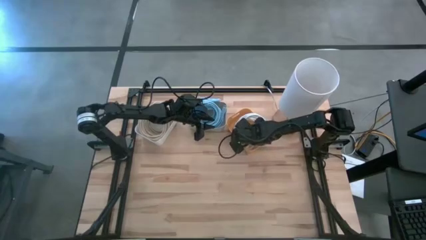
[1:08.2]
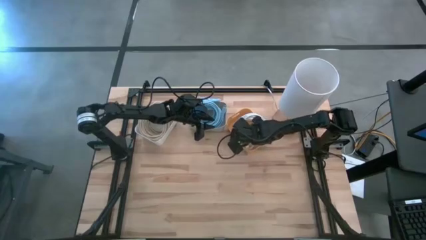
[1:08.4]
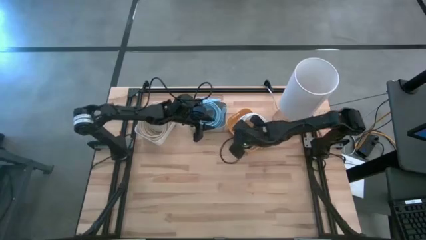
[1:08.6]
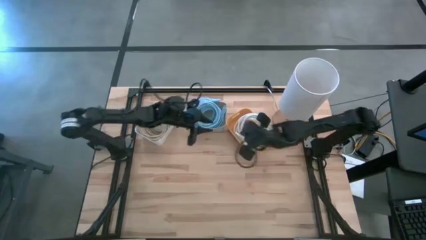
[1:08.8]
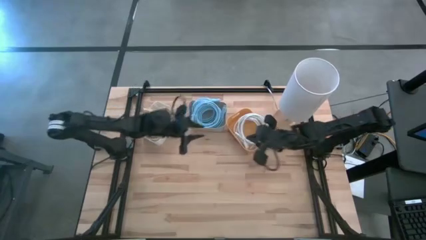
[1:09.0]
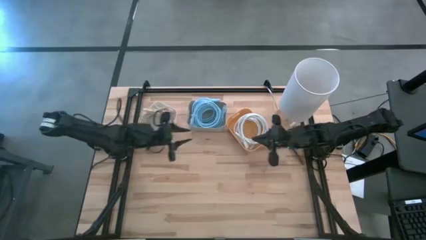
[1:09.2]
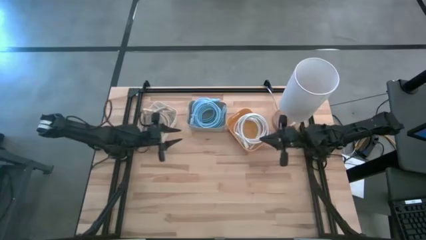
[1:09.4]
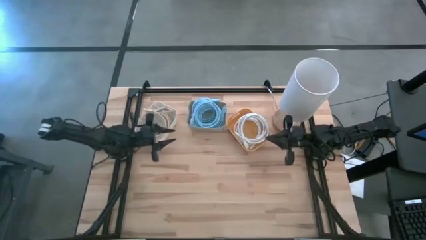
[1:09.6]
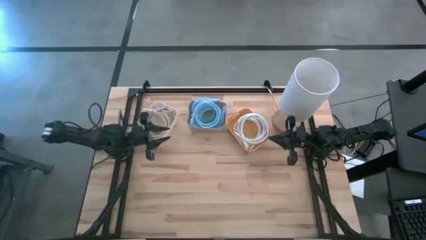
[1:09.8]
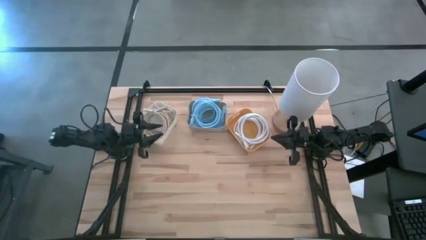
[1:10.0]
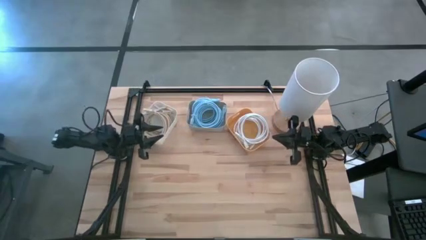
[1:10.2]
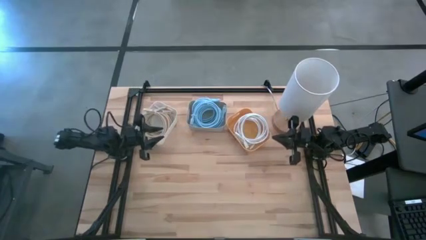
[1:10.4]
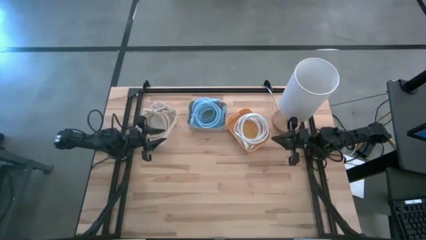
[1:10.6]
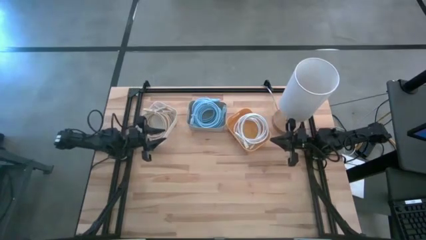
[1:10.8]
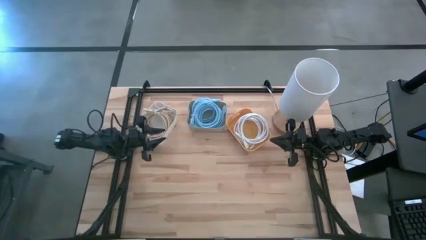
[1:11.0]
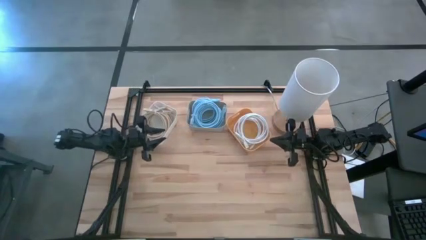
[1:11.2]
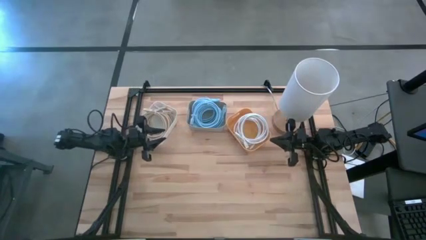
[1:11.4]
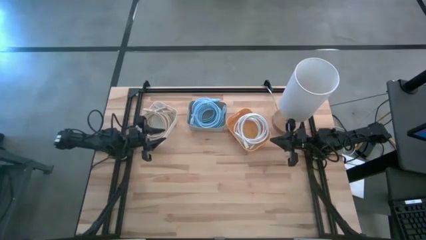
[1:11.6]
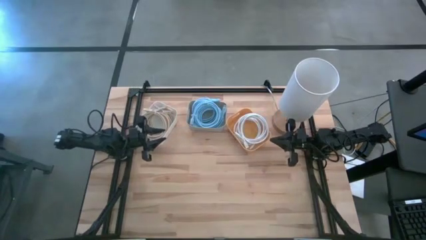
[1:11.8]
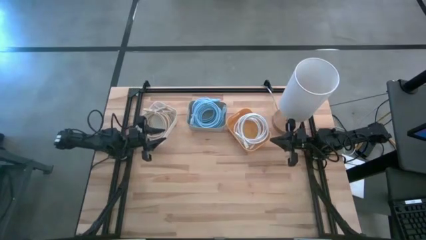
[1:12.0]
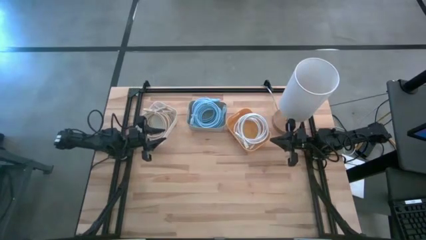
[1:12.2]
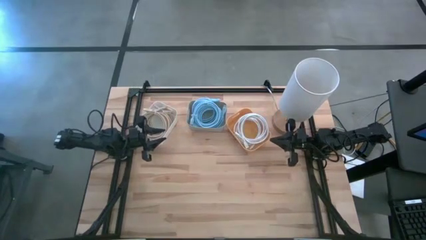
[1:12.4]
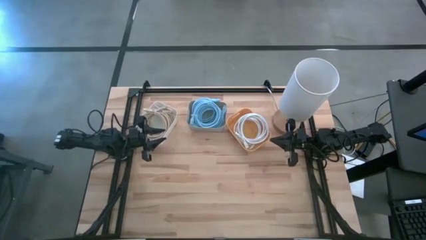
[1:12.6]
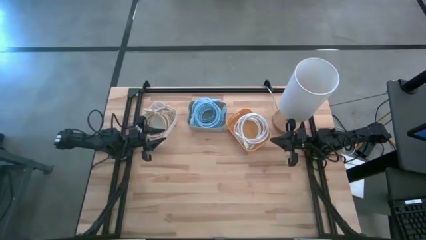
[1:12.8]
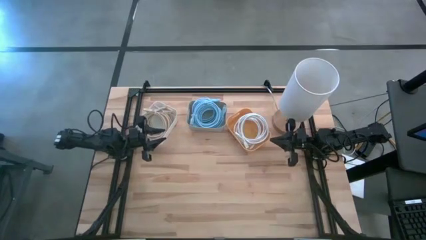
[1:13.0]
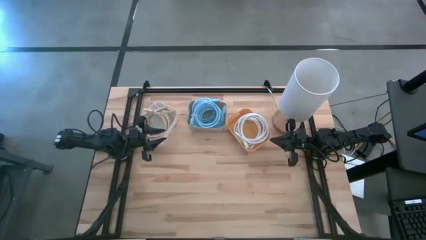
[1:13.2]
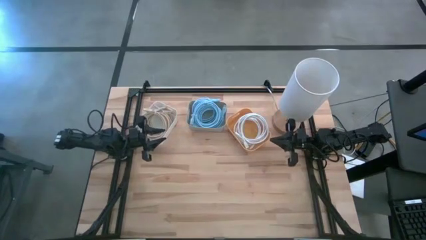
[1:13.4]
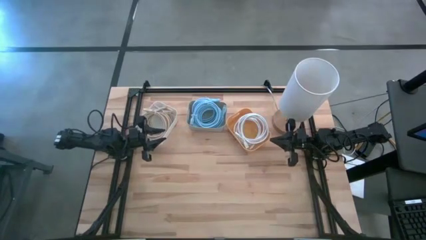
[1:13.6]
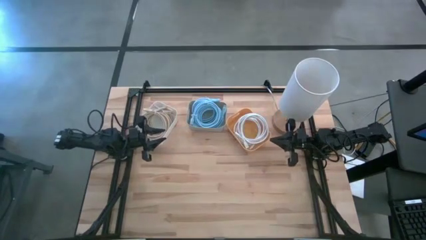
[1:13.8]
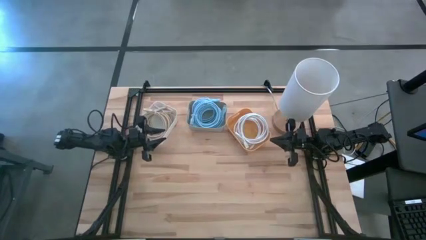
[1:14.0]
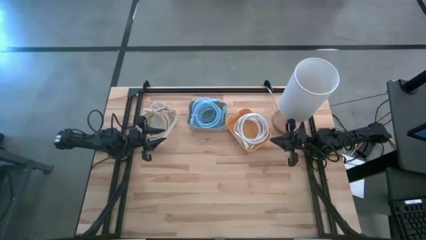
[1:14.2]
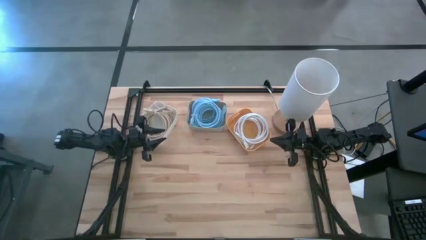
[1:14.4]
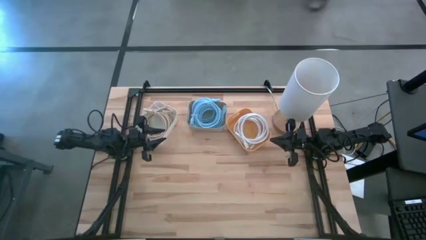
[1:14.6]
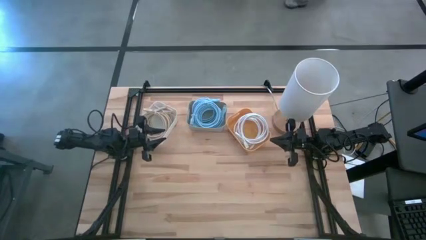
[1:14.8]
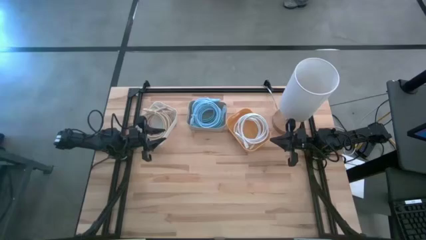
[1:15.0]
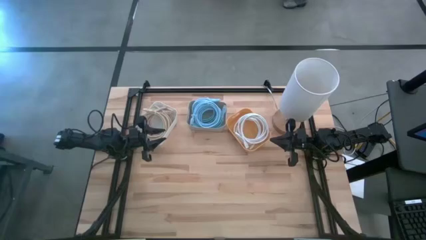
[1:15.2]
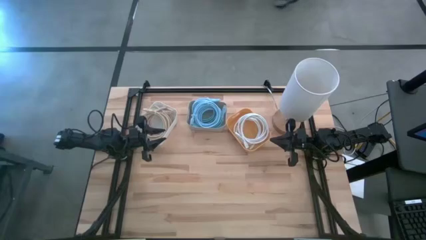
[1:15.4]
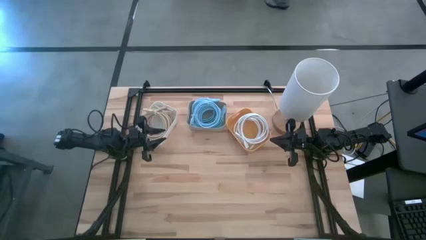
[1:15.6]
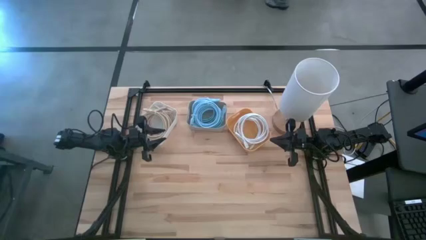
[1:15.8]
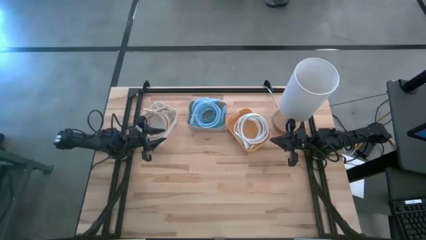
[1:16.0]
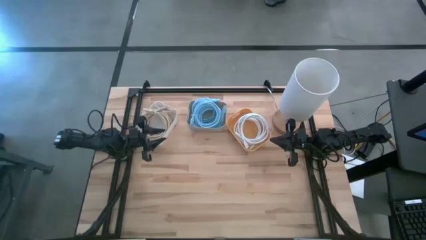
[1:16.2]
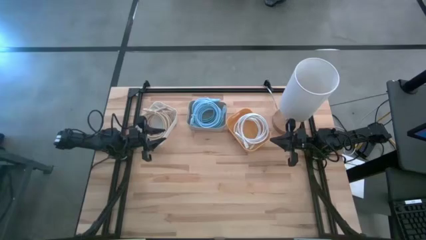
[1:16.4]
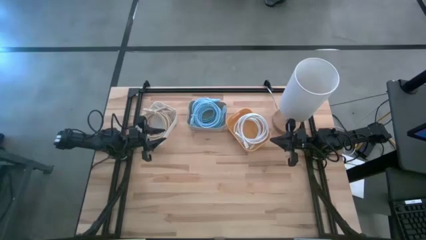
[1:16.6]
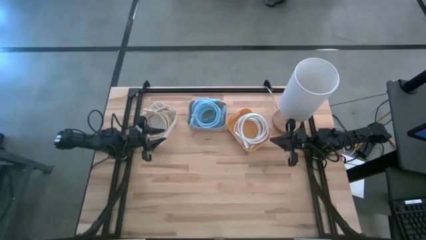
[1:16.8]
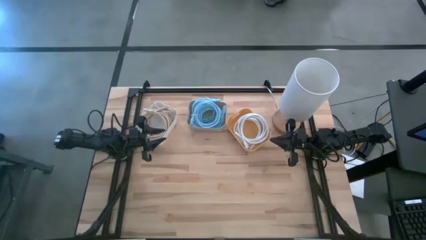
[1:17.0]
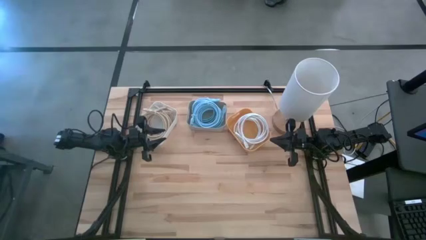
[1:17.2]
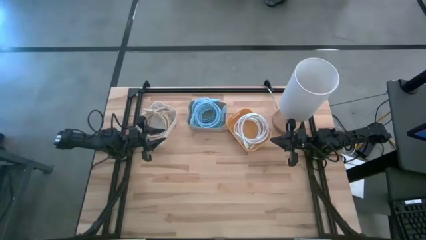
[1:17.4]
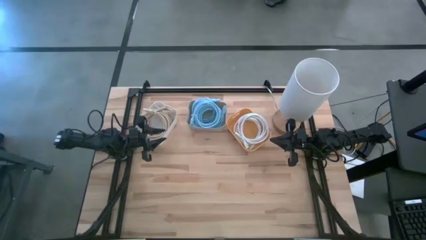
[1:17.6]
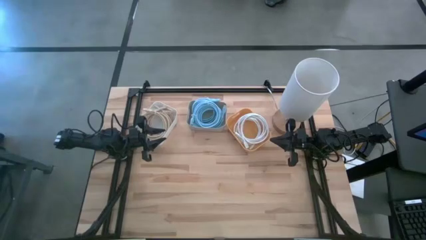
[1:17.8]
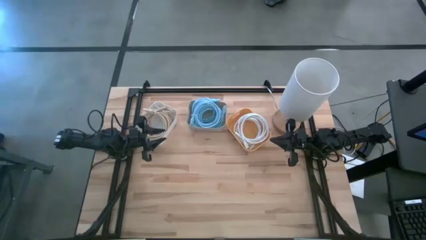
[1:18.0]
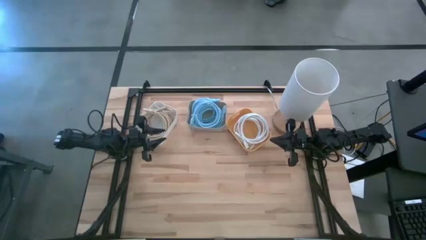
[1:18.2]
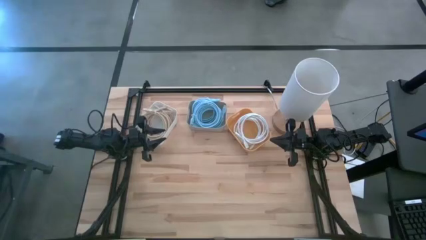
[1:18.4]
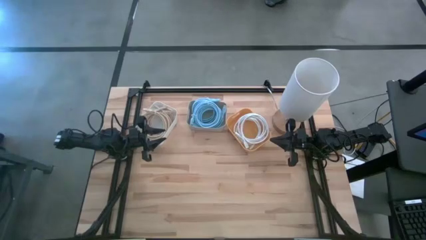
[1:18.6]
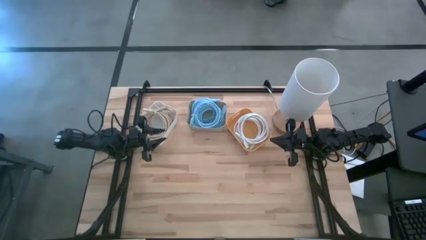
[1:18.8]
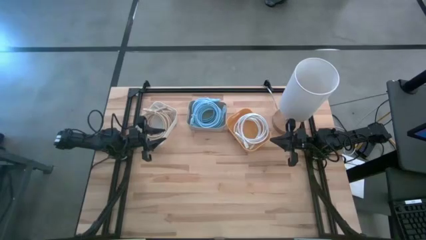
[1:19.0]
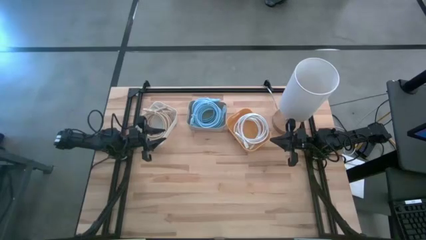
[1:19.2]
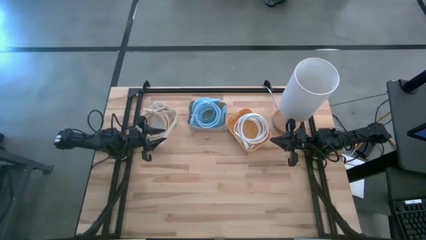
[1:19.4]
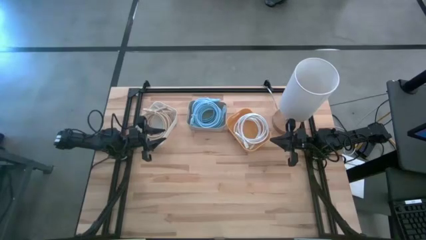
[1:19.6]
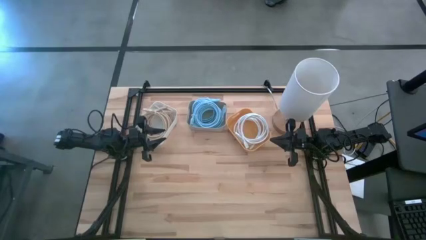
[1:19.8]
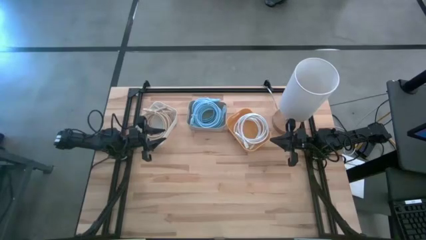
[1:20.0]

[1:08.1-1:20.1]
Task: Sort HDMI cables
Return to Home Position

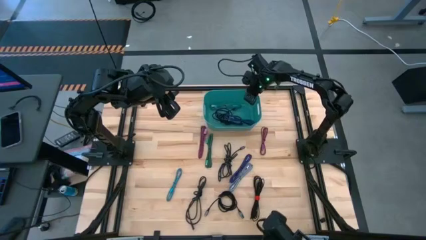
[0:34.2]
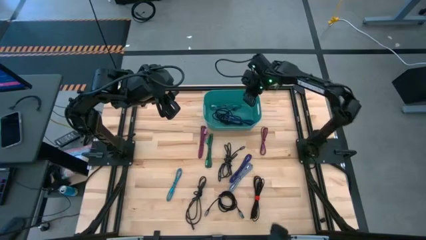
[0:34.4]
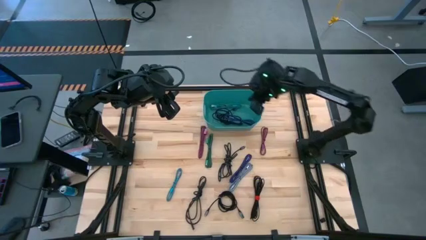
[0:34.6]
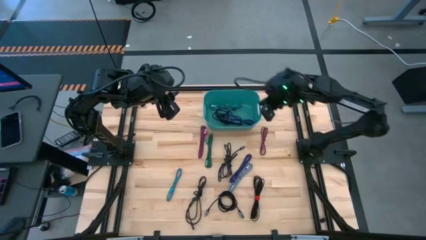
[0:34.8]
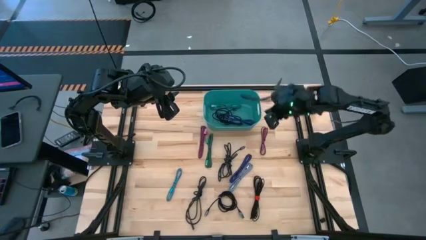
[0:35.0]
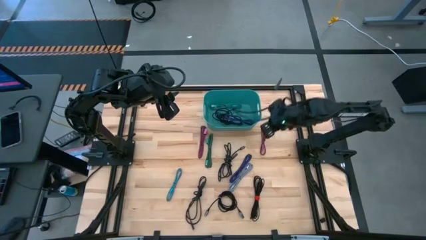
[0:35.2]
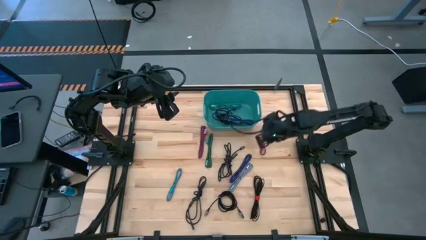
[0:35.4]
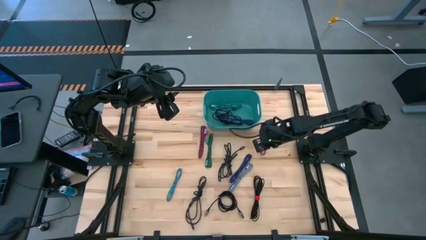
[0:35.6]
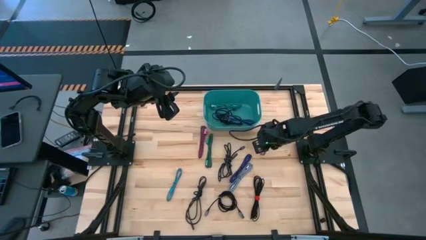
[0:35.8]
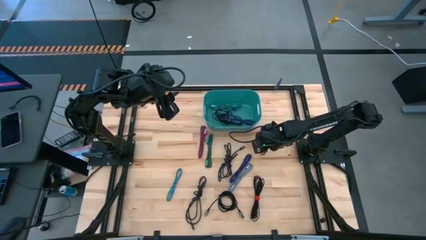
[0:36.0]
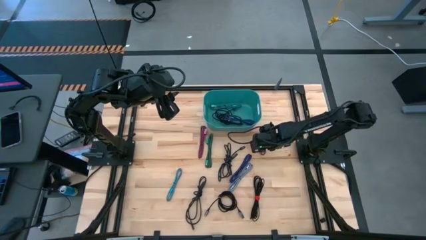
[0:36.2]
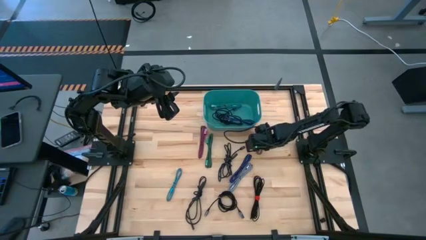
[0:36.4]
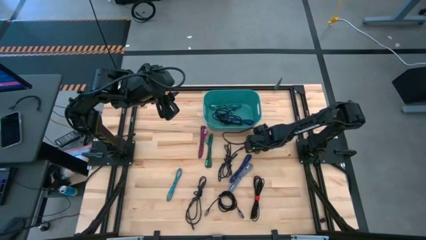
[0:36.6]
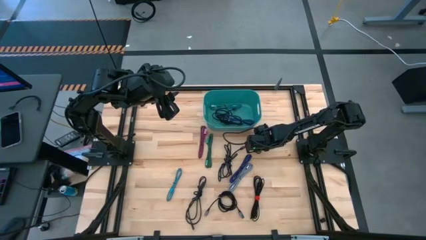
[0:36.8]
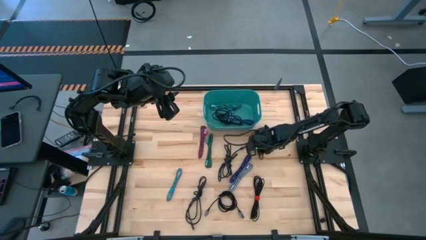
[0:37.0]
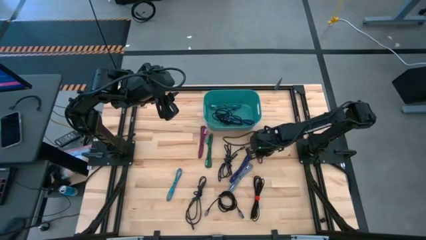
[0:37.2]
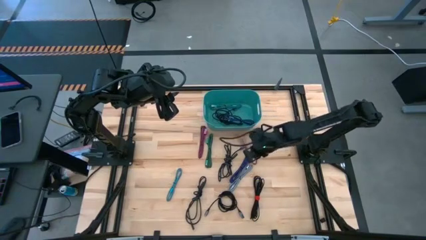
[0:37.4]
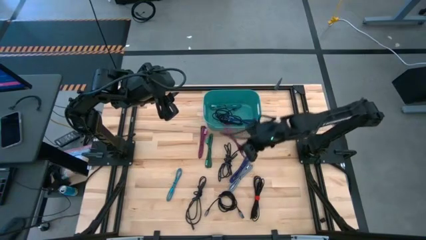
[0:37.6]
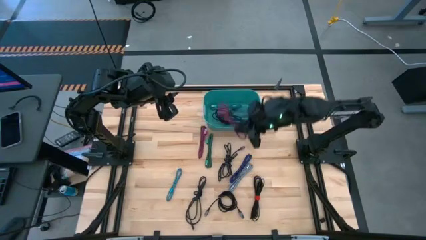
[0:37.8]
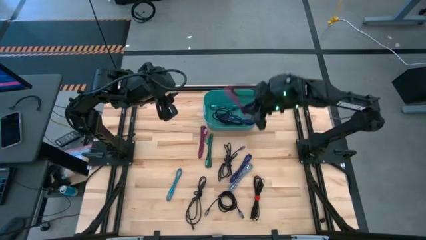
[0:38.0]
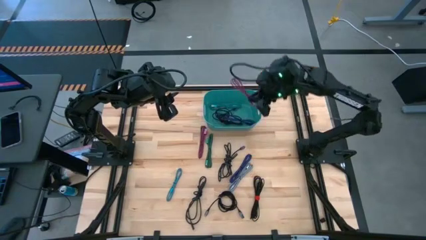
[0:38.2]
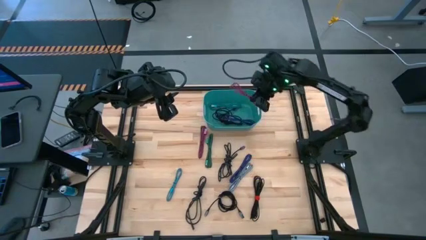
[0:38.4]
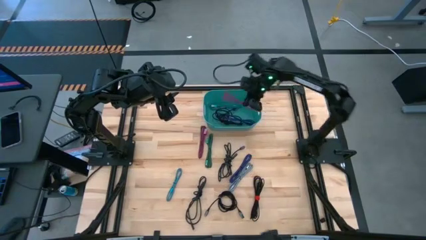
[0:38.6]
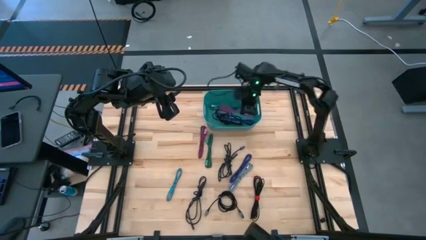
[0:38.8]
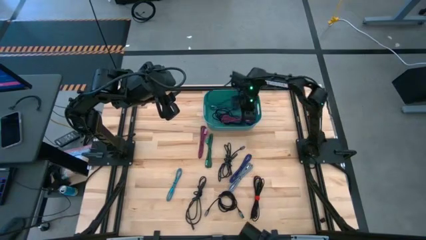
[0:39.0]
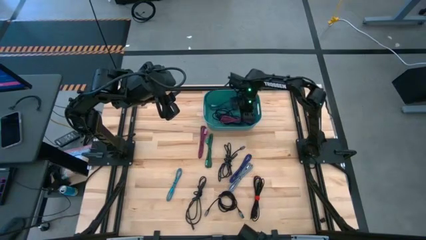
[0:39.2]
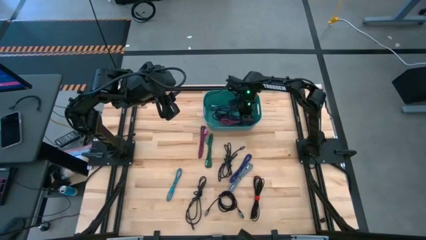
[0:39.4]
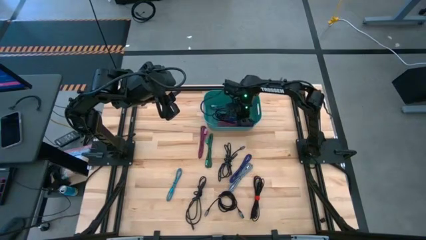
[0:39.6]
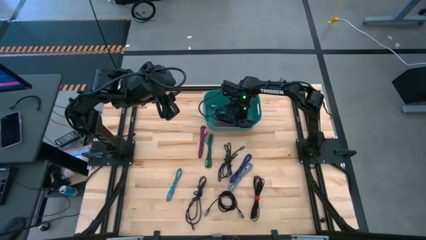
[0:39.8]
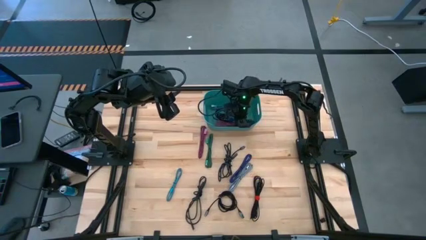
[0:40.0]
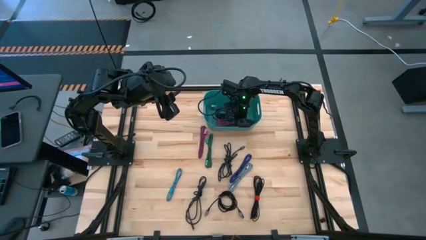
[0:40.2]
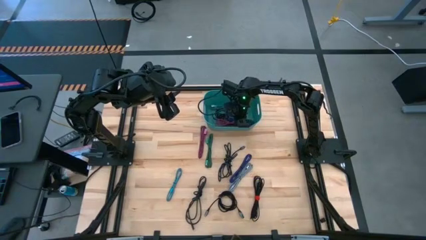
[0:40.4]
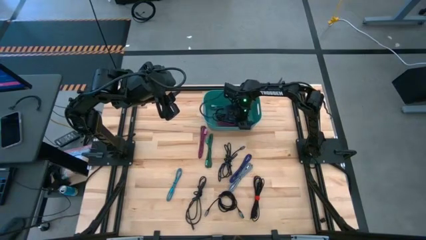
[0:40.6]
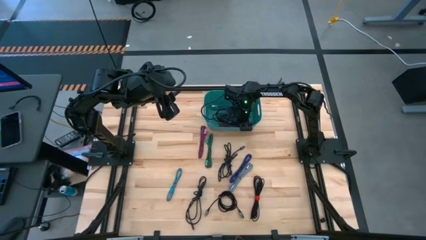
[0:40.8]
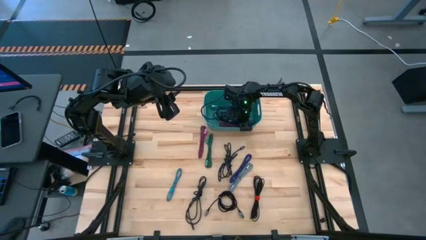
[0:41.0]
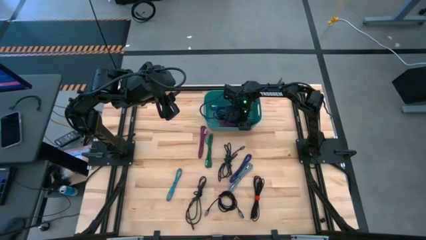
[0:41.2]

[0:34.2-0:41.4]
Task: Pick and place USB-C Cables
Put the right pink charger cable into the light blue bin
